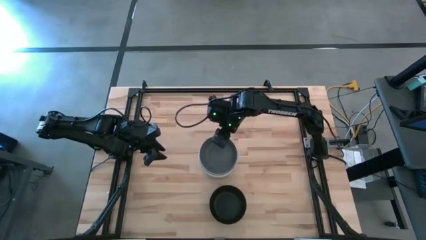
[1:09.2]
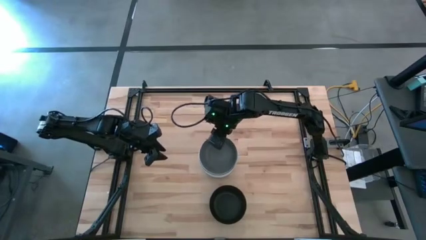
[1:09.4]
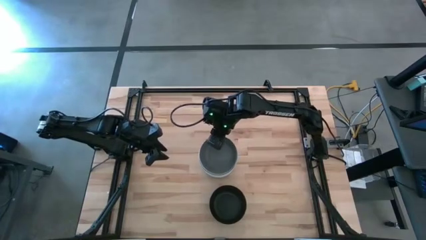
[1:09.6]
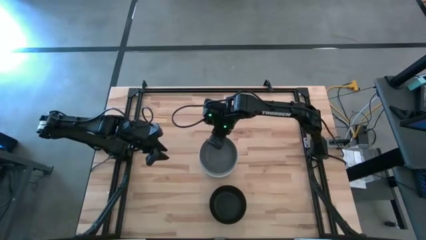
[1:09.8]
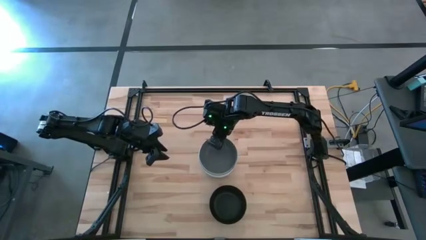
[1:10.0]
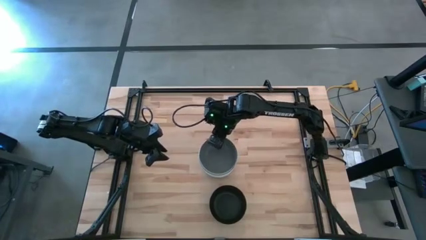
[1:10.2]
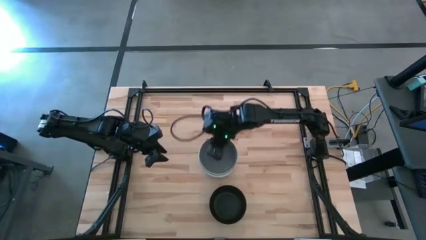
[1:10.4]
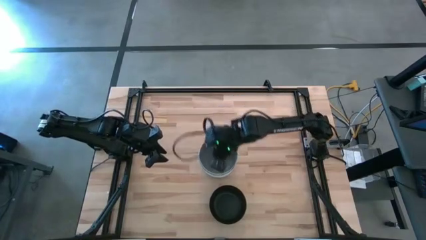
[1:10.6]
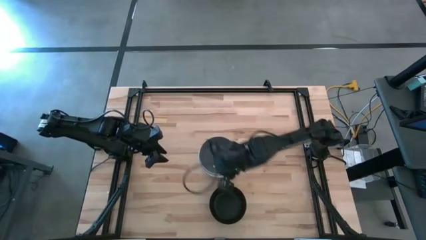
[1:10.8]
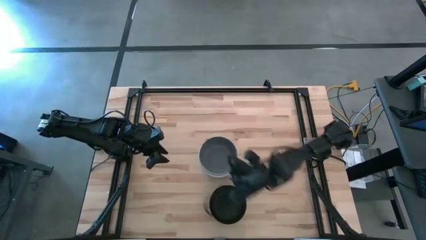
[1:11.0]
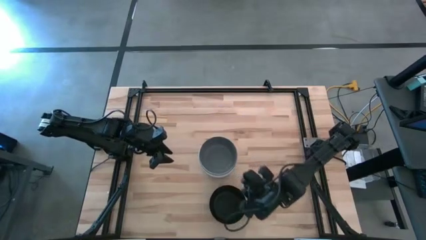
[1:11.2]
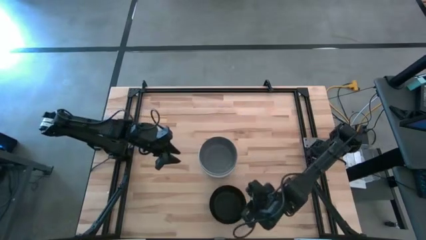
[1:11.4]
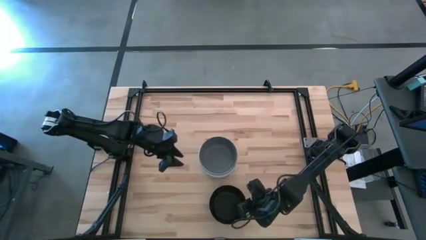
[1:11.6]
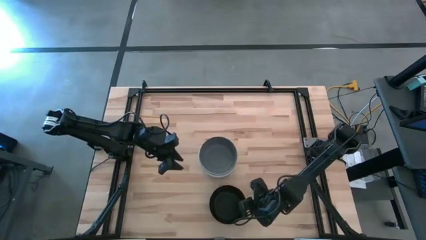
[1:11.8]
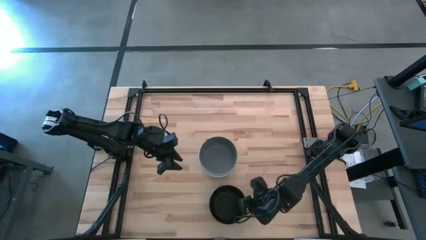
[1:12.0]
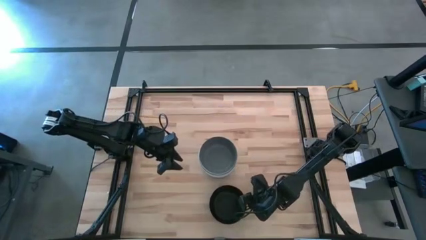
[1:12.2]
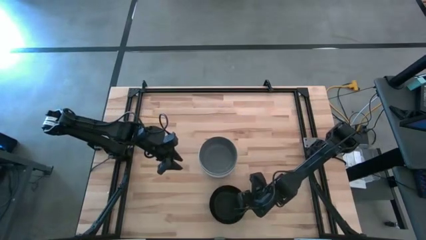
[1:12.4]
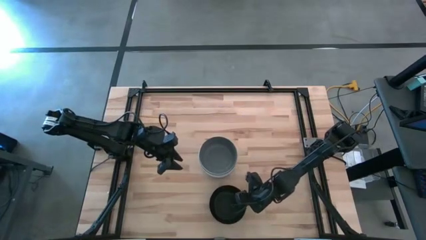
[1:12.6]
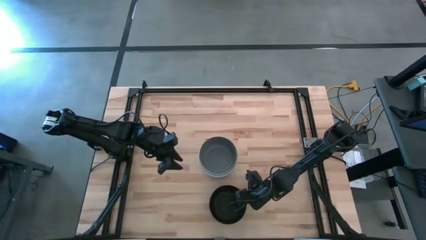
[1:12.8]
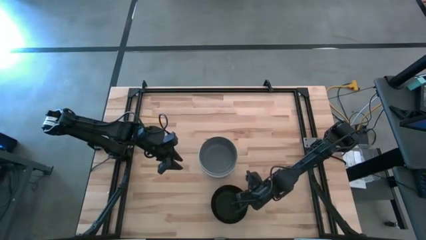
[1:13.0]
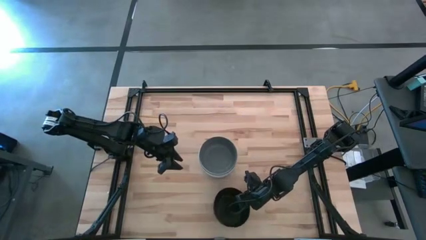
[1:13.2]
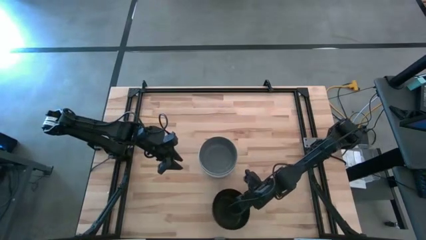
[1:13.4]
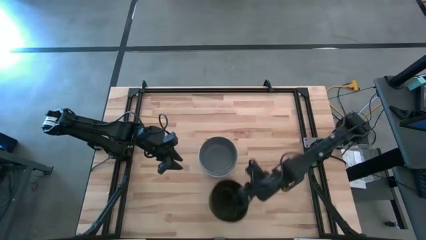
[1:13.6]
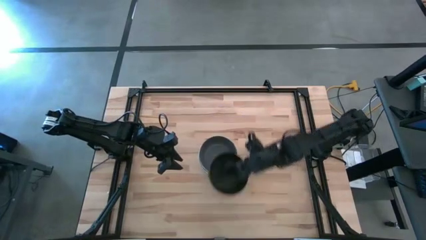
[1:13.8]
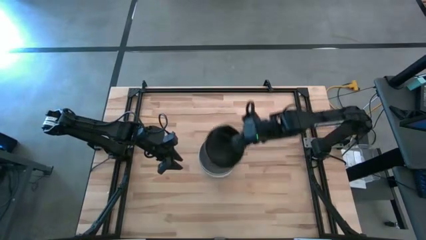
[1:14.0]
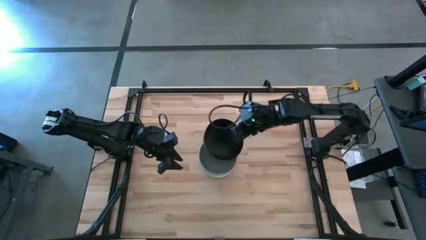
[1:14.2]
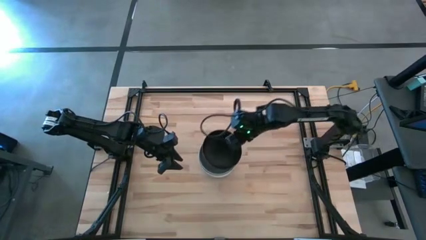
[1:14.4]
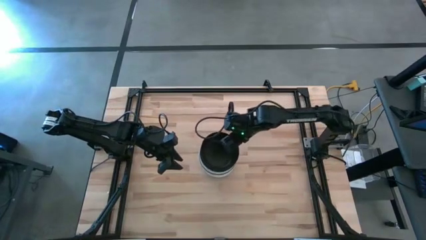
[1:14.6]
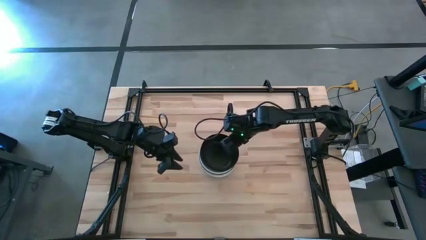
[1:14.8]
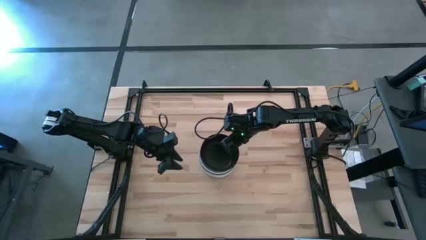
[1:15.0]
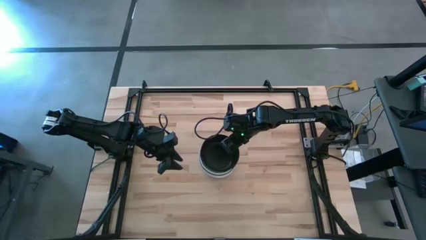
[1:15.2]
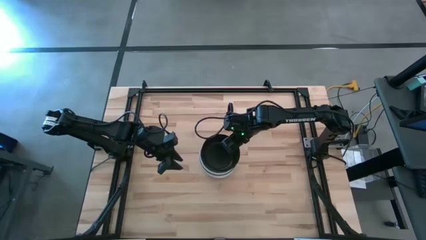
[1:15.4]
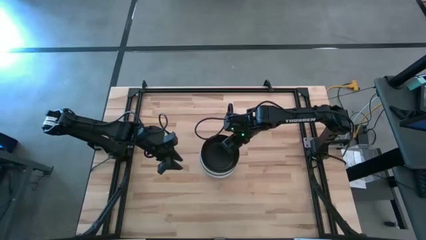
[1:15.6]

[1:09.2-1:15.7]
Task: Nest bowls inside each other
Stack the black bowl on the gray bowl

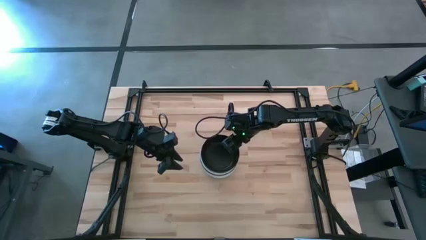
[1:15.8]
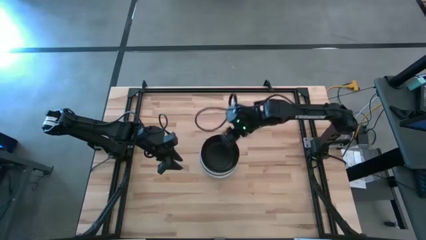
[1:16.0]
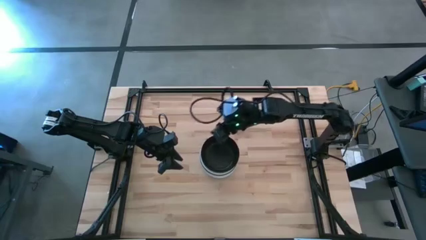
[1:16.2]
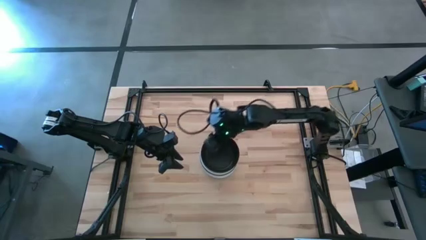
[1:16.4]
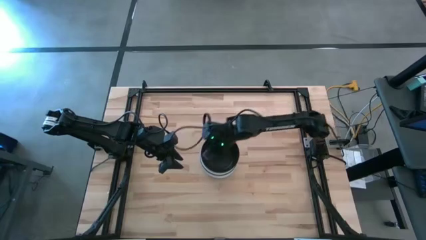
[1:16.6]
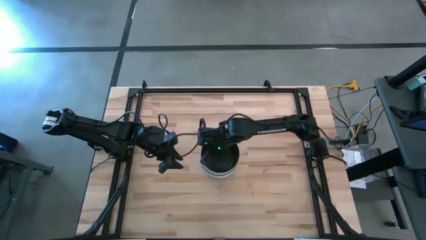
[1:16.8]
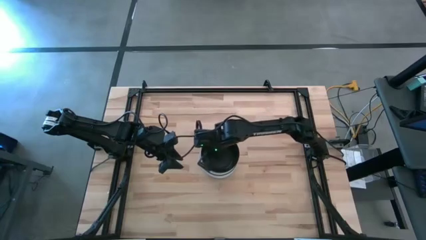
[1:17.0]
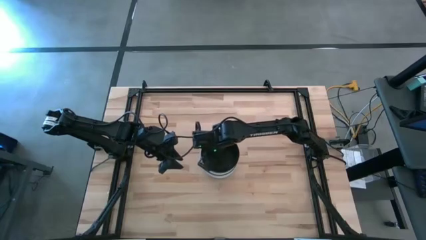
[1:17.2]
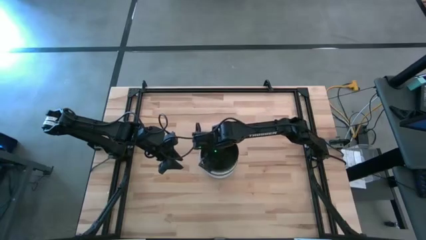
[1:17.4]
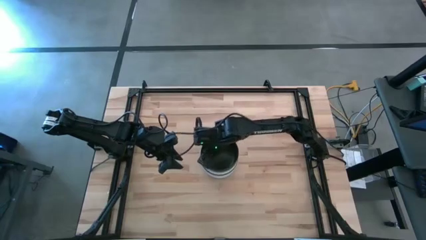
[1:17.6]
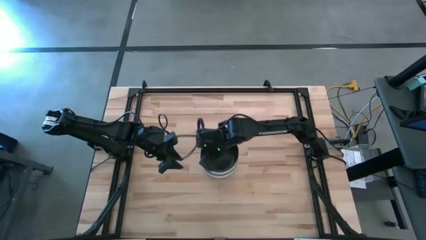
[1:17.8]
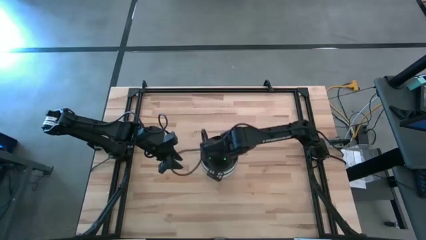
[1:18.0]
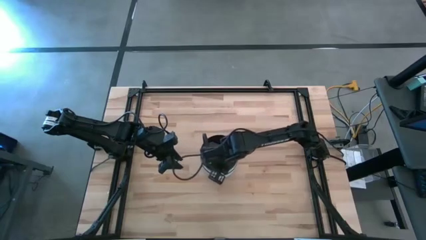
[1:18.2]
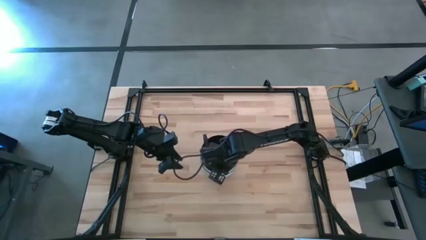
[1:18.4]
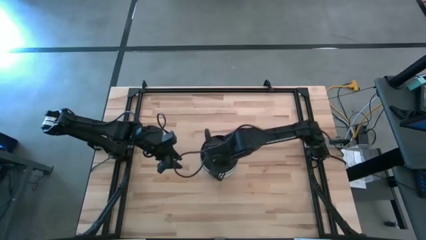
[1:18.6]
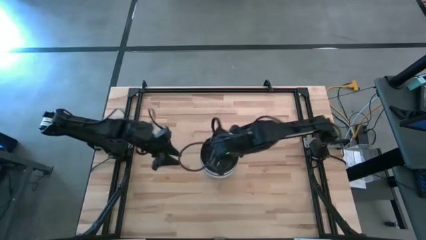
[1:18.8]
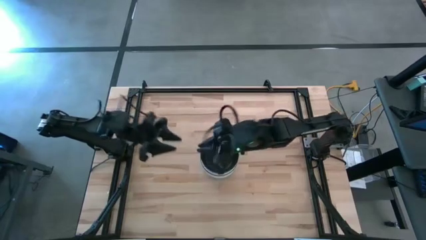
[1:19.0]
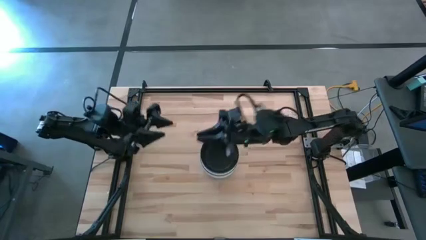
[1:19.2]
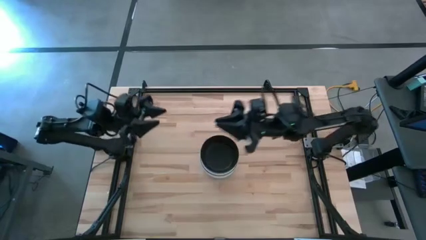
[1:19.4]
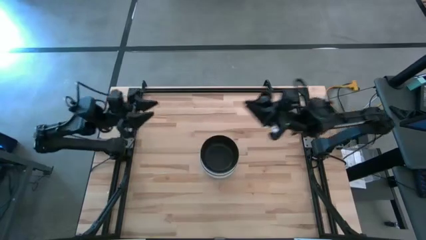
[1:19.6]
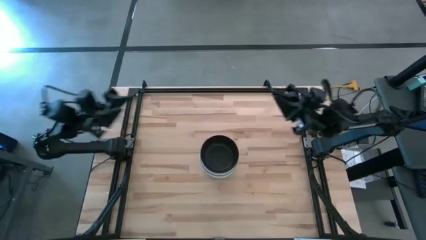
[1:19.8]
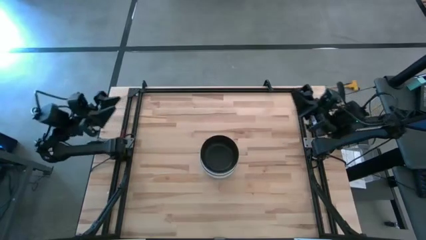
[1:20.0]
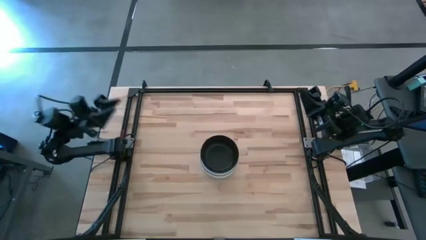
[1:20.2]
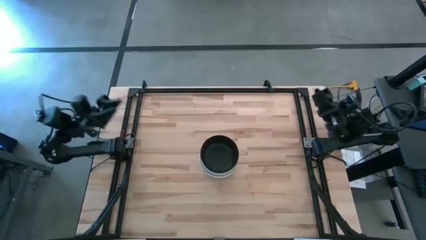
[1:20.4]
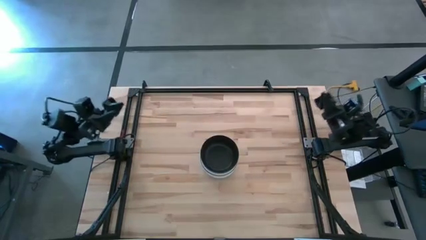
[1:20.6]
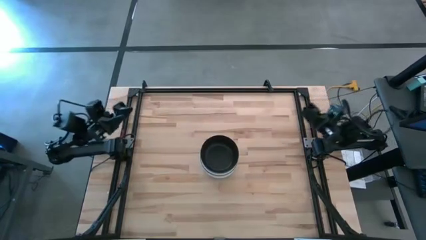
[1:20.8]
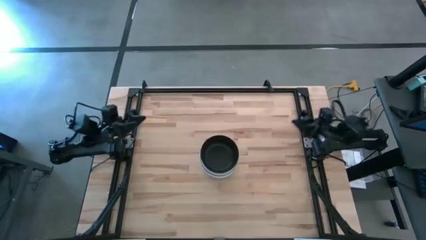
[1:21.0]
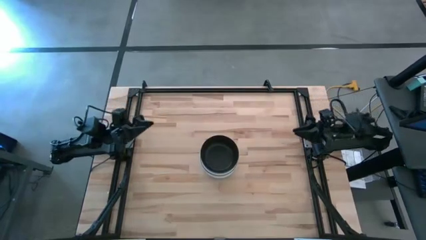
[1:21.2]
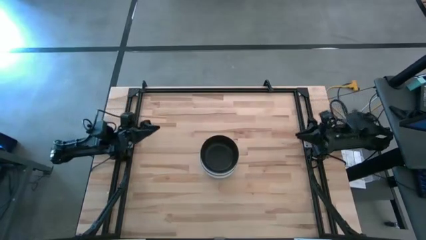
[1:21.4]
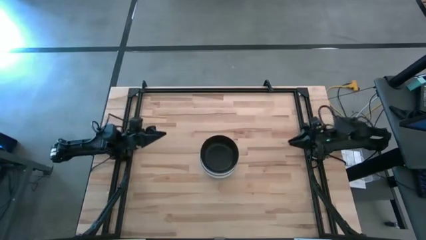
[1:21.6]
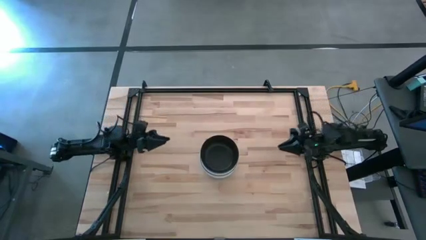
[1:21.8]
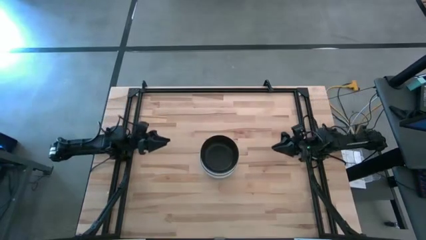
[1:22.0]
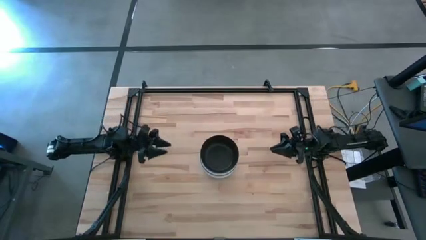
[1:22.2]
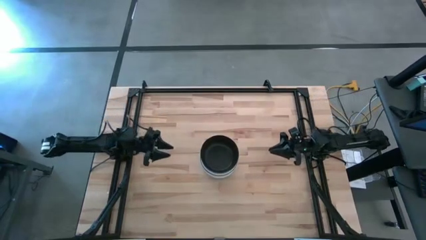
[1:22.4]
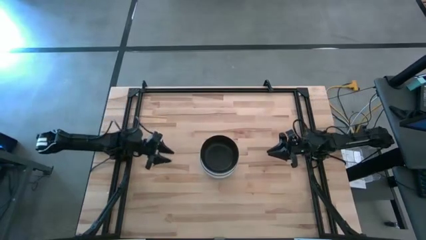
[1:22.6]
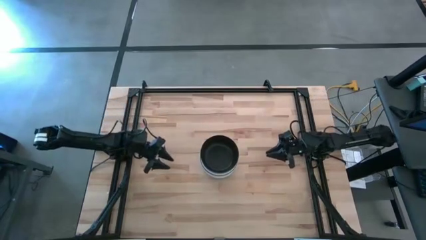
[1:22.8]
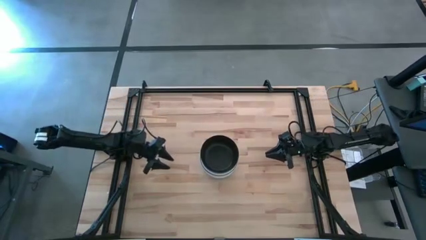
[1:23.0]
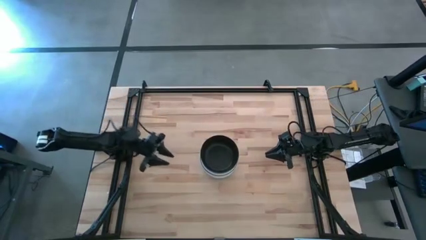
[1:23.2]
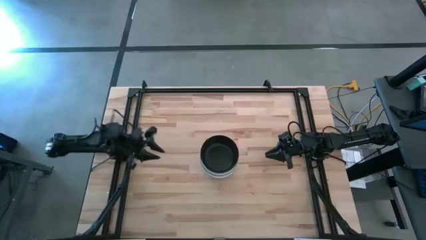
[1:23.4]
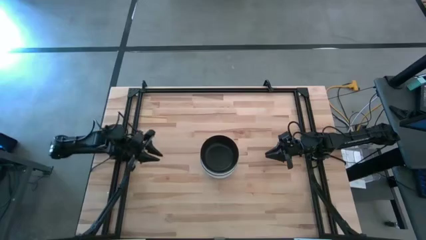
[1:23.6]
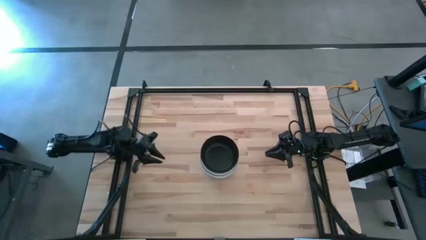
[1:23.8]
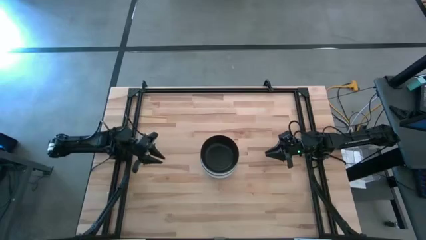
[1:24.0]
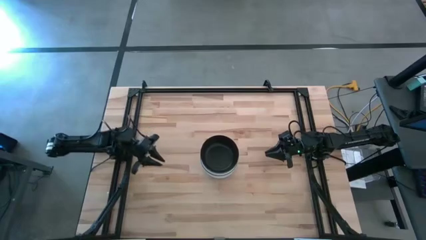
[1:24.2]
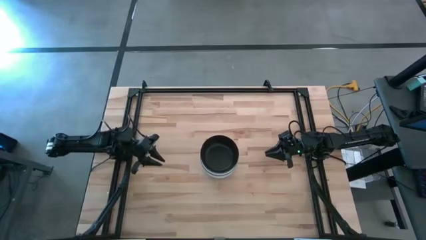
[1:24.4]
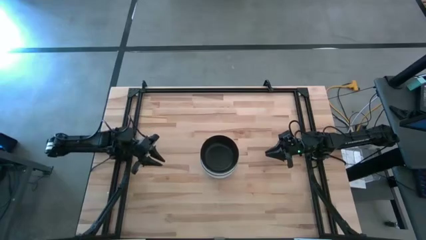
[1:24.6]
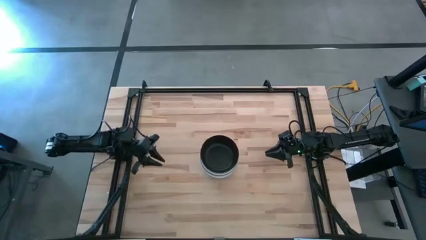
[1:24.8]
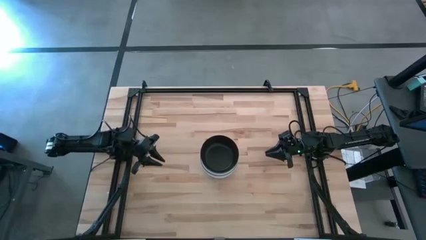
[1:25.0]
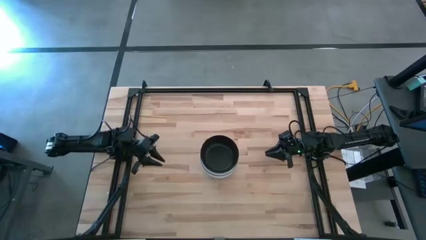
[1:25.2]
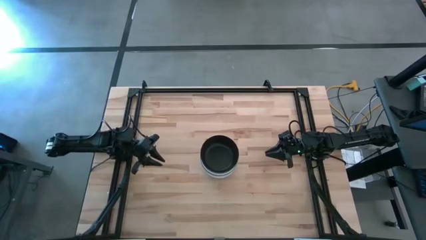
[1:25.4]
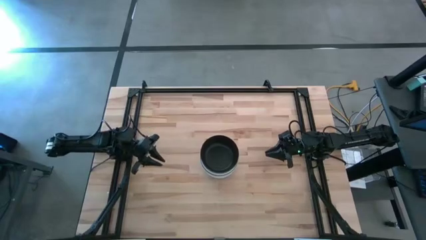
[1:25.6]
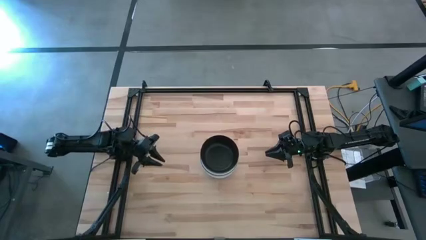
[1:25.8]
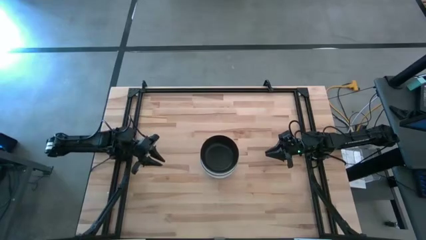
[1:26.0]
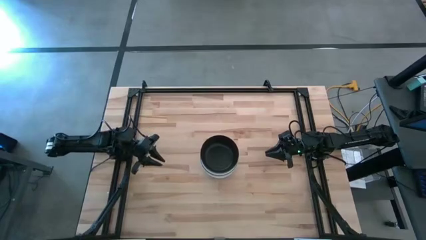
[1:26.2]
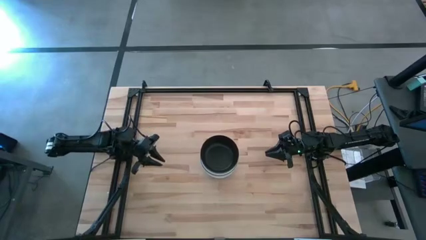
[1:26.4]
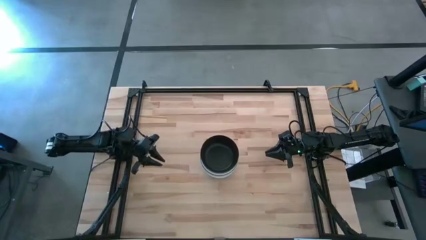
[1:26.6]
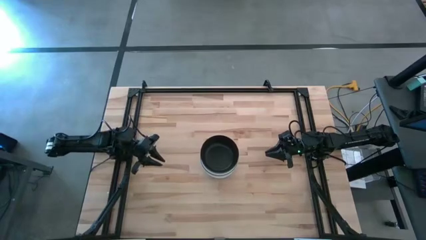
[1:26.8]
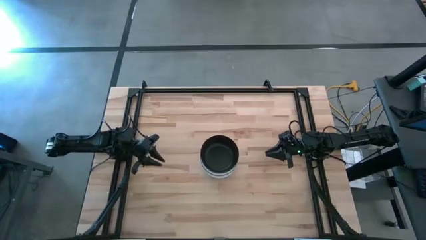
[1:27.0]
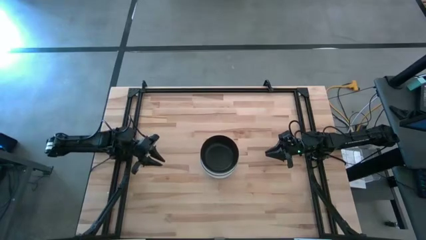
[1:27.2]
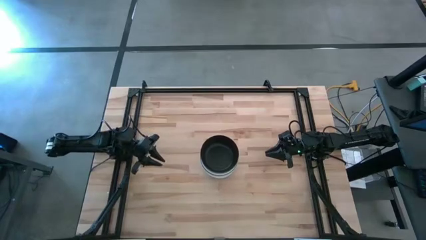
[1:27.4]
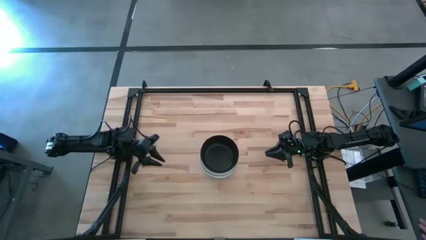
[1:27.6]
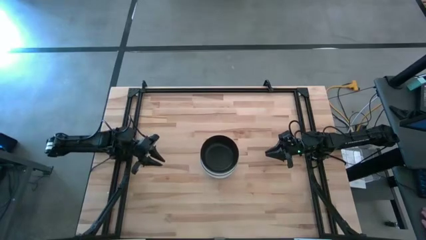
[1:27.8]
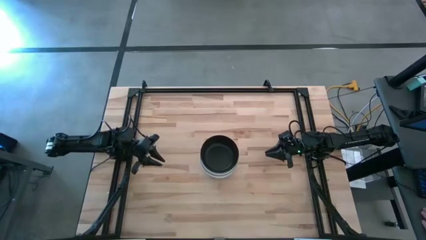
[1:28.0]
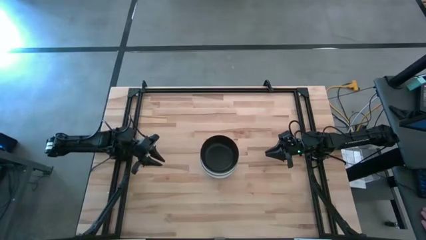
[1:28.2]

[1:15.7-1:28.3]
Return to Home Position
